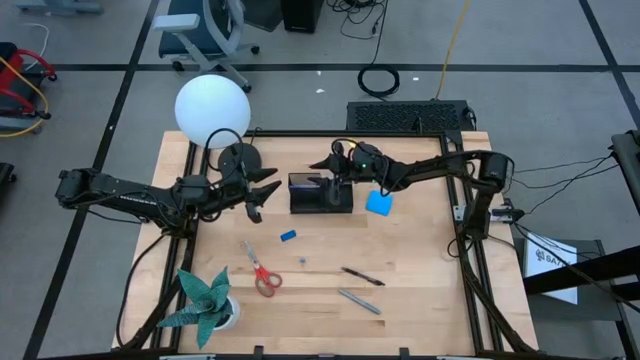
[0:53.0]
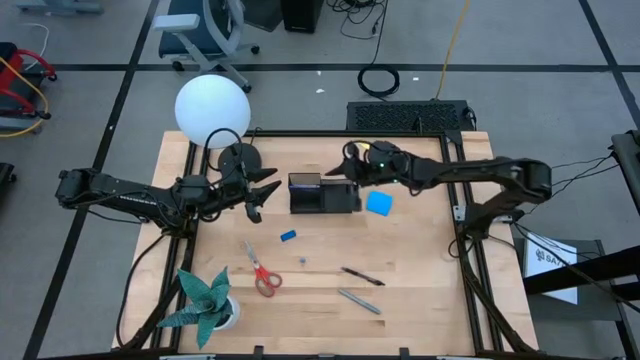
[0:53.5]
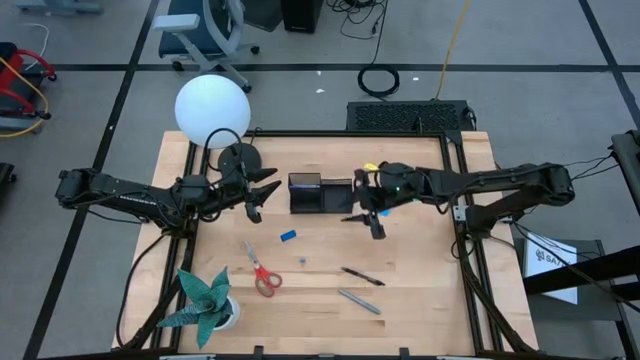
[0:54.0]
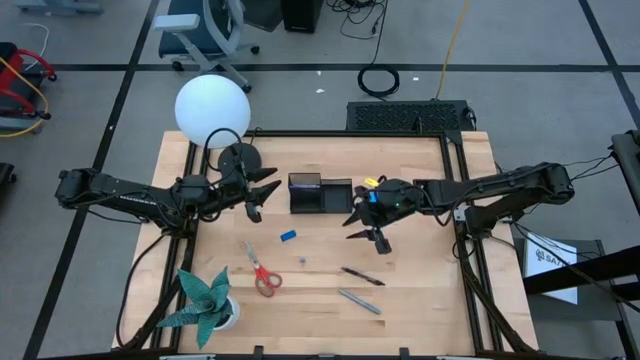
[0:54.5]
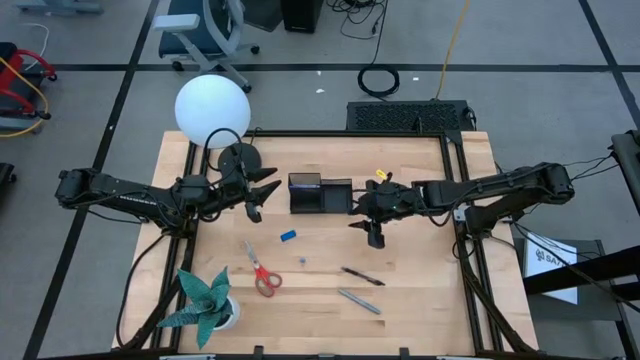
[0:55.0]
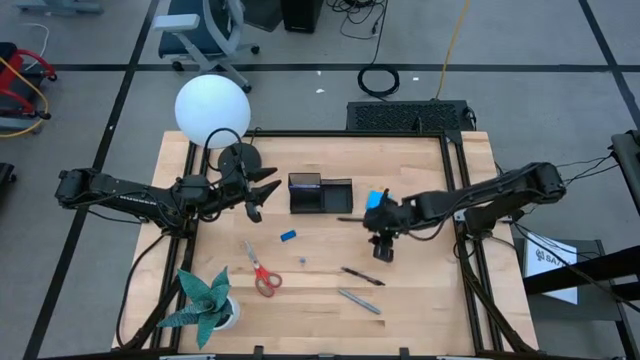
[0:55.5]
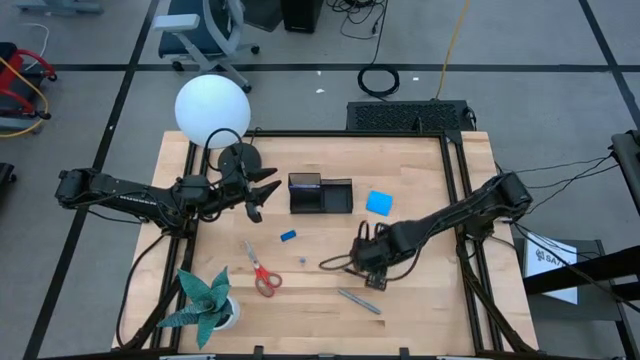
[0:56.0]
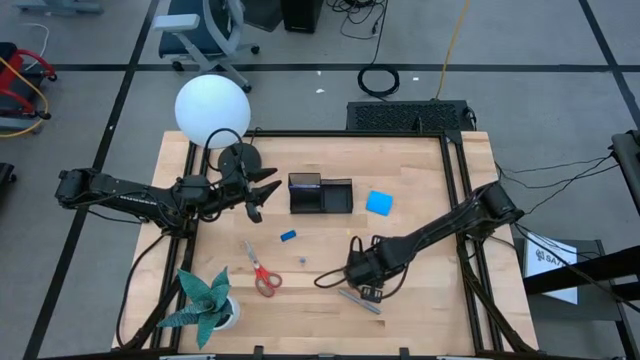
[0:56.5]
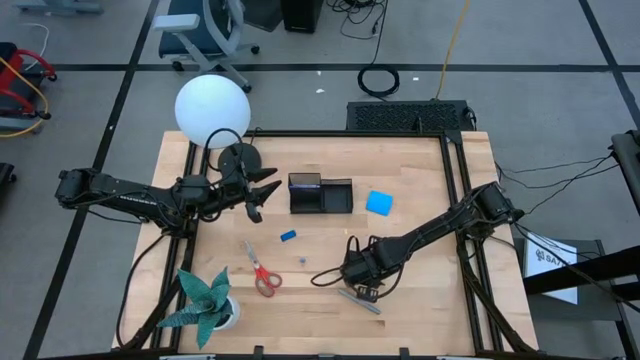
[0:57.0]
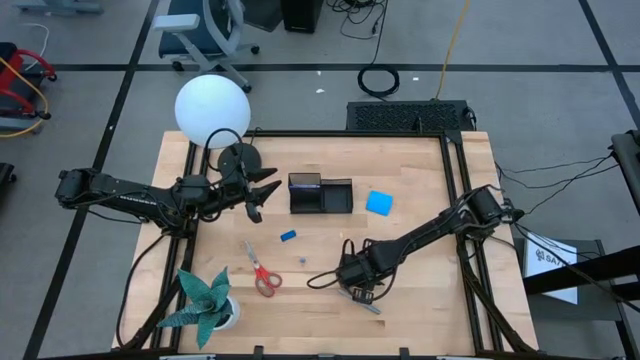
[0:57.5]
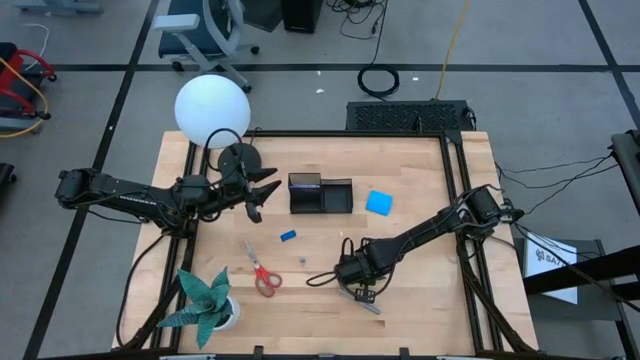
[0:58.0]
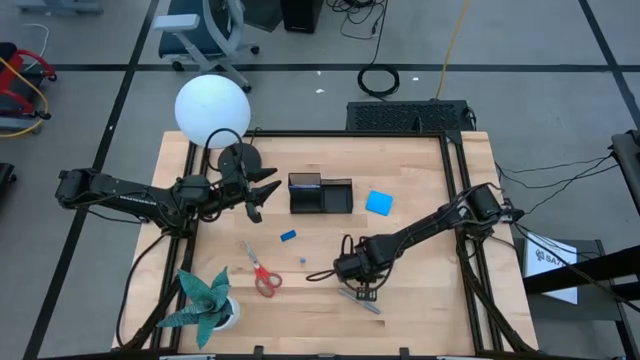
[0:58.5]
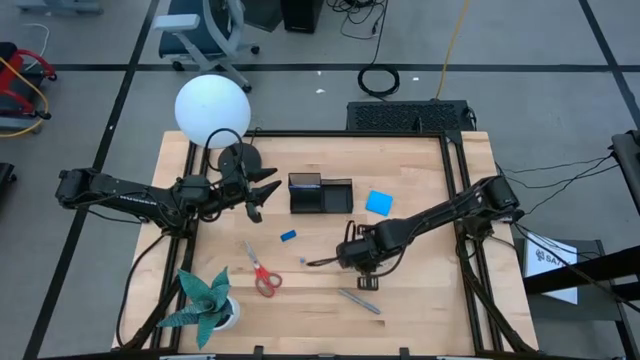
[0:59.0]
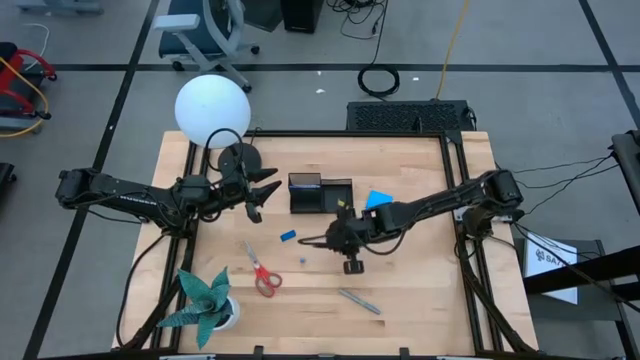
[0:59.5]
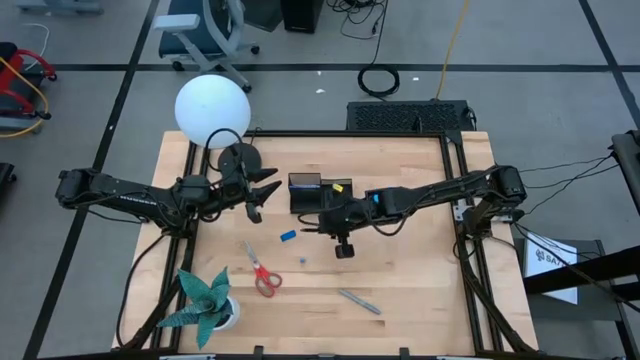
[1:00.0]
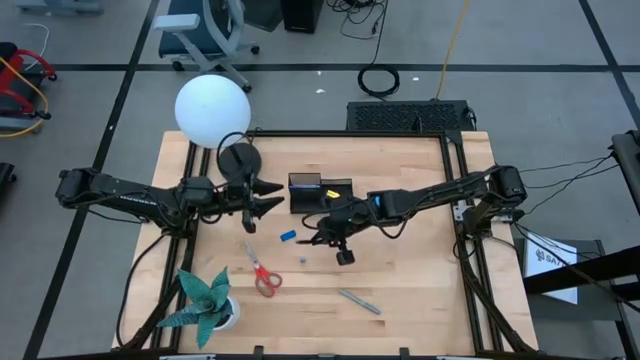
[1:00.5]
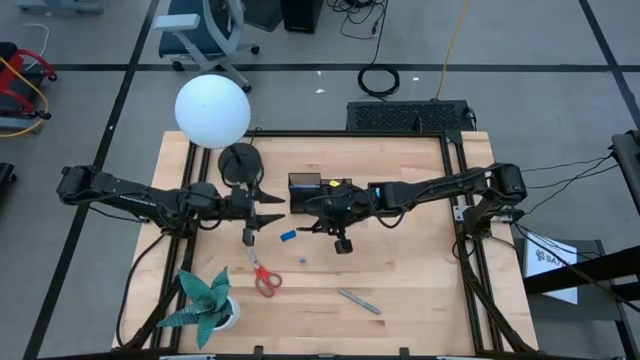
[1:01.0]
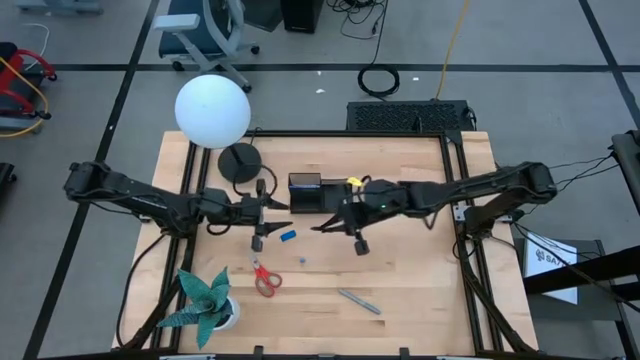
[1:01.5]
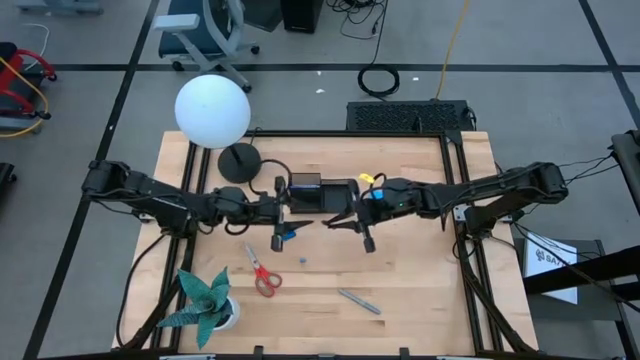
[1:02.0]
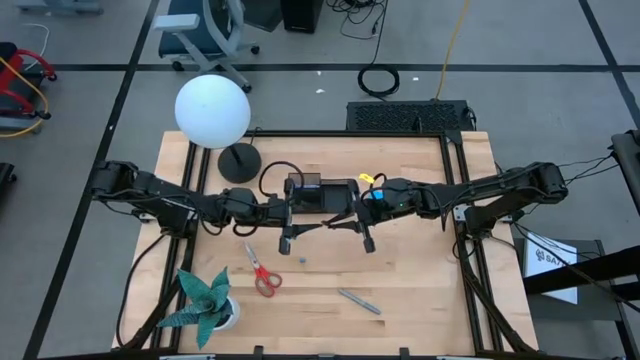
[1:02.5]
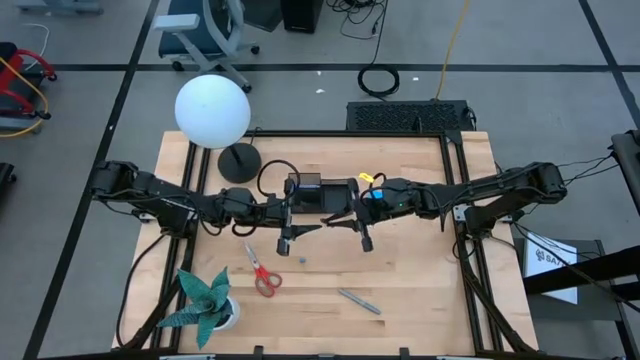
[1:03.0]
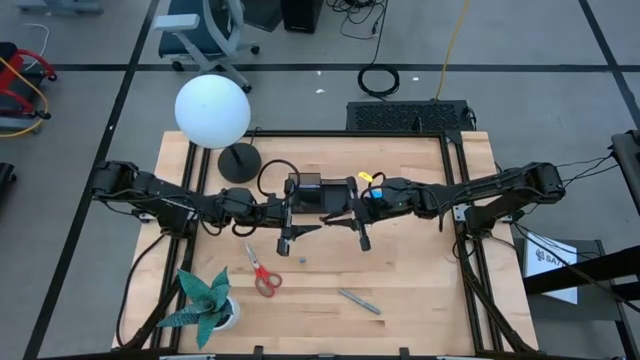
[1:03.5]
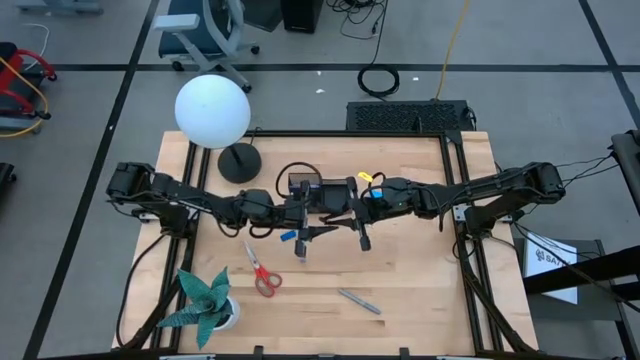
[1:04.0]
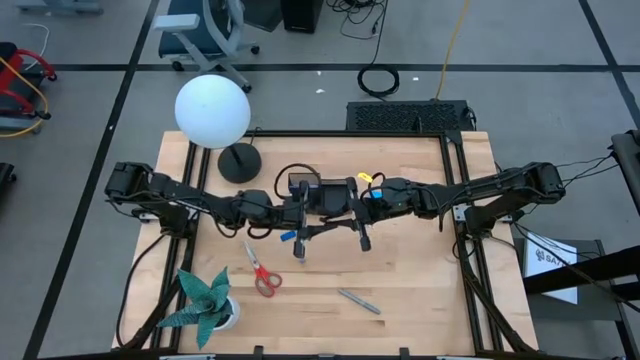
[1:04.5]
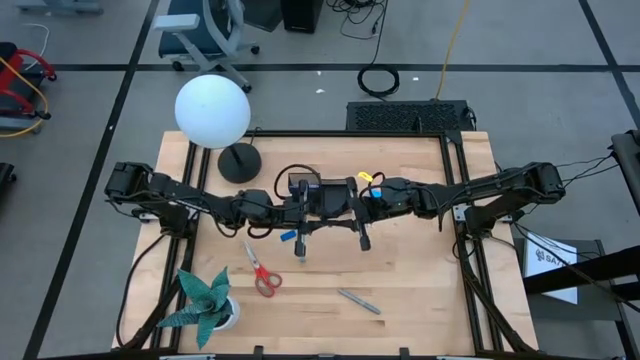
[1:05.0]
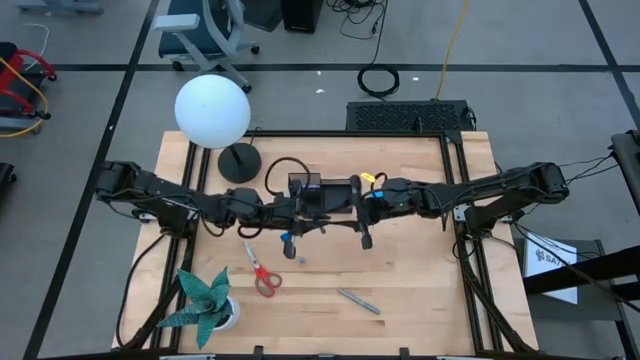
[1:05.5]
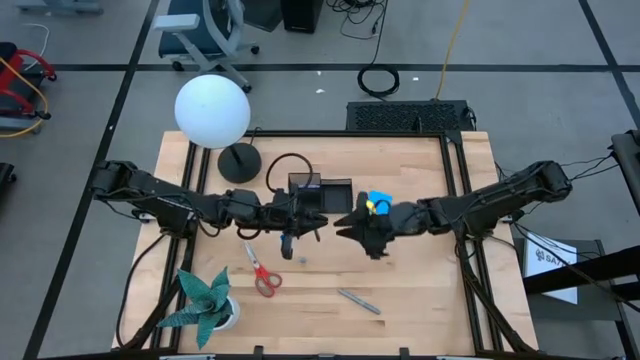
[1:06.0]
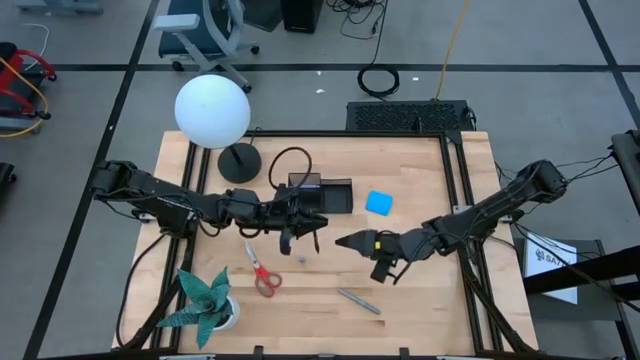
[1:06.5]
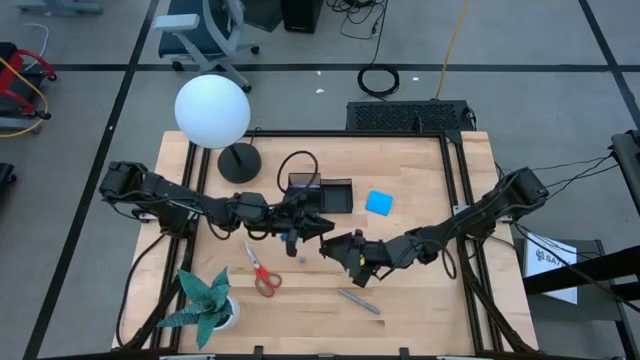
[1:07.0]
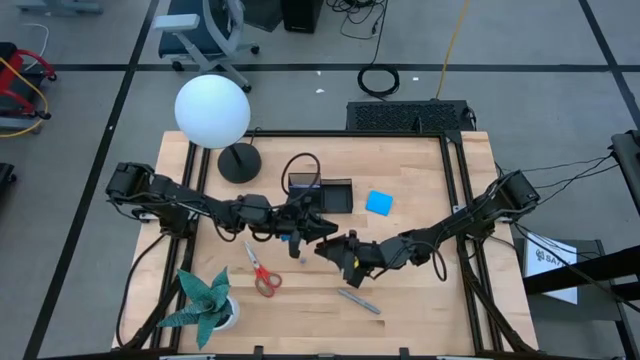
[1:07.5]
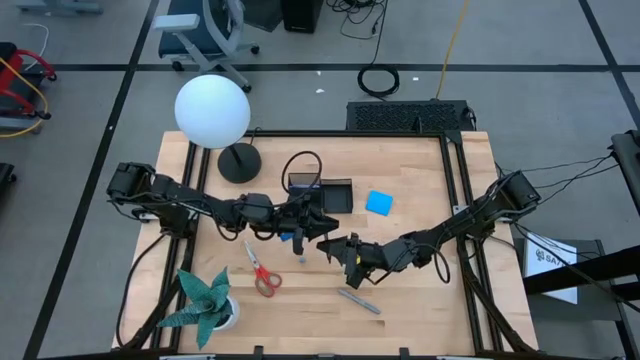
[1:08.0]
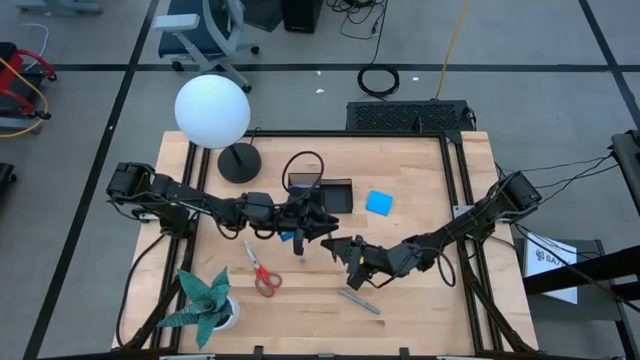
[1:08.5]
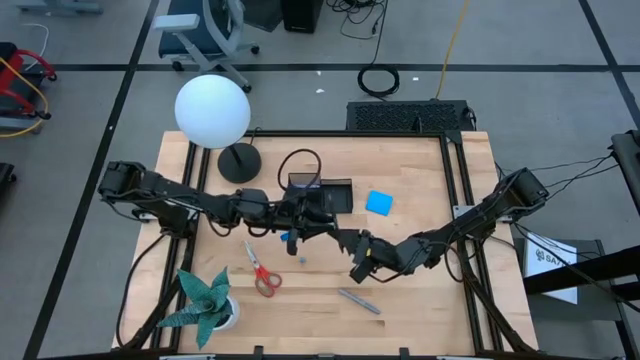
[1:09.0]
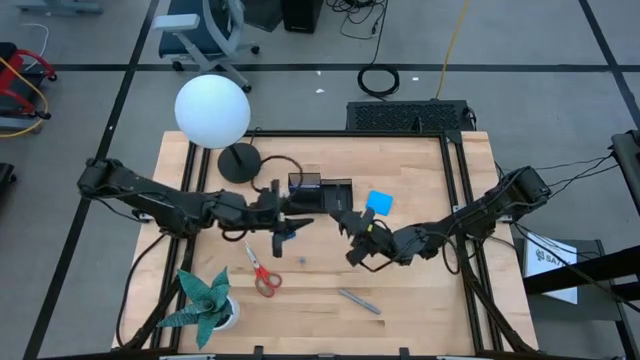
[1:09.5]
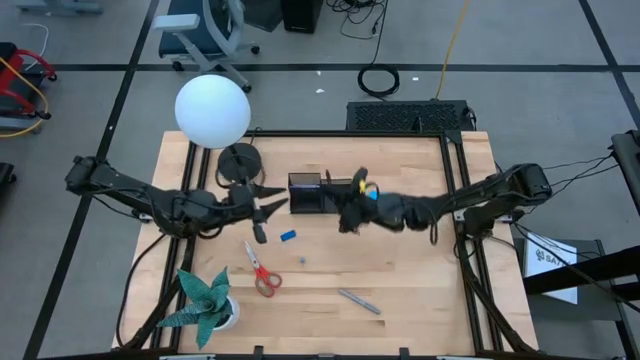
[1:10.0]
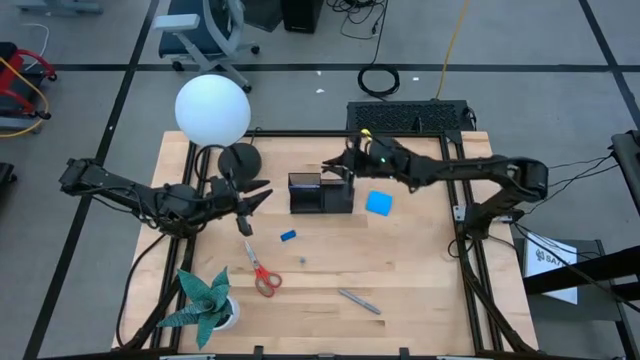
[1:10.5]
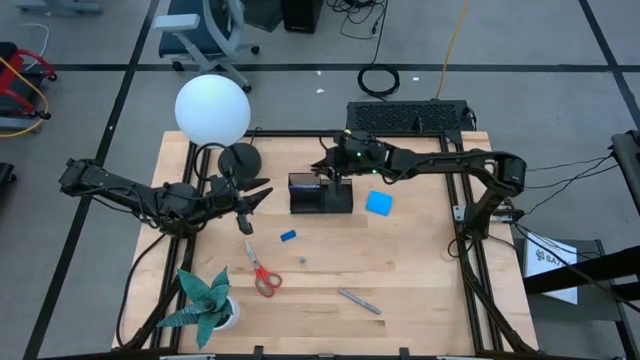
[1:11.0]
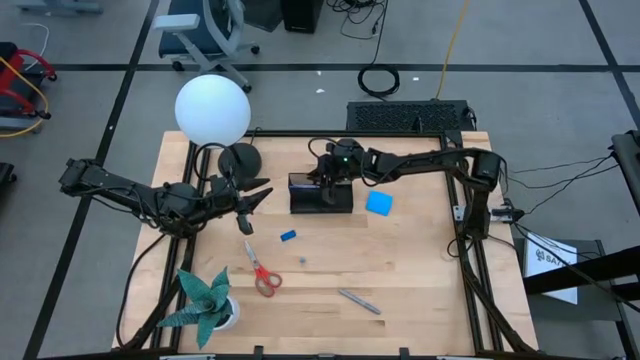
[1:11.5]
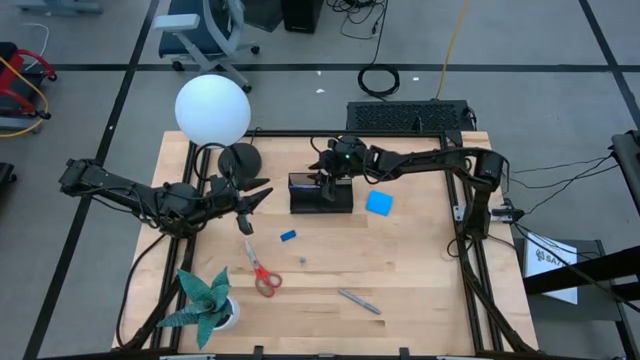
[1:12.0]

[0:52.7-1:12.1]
Task: Pick and place office supplies into organizer
Put the black pen into the black desk organizer

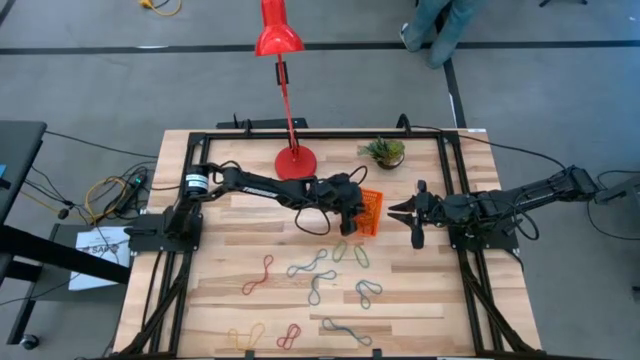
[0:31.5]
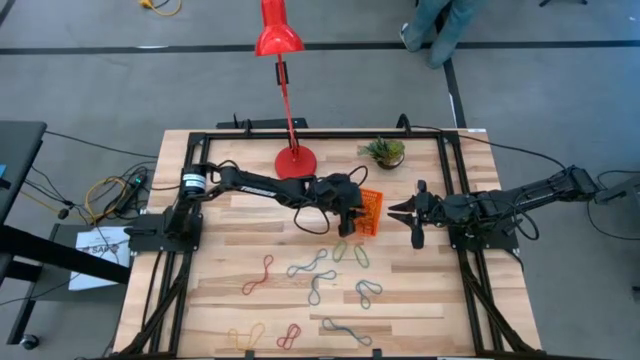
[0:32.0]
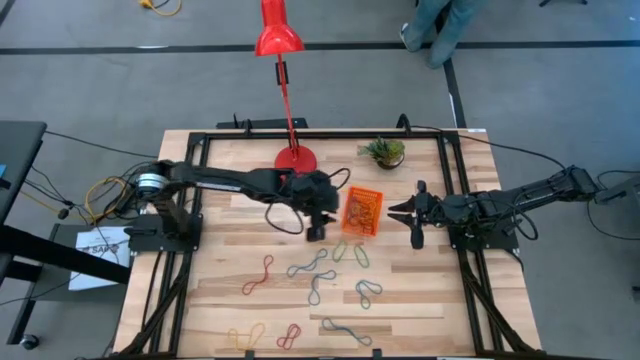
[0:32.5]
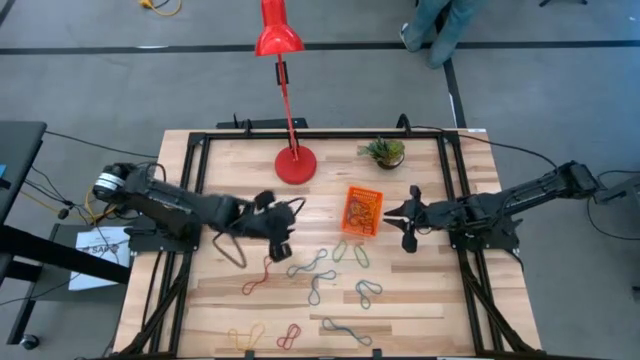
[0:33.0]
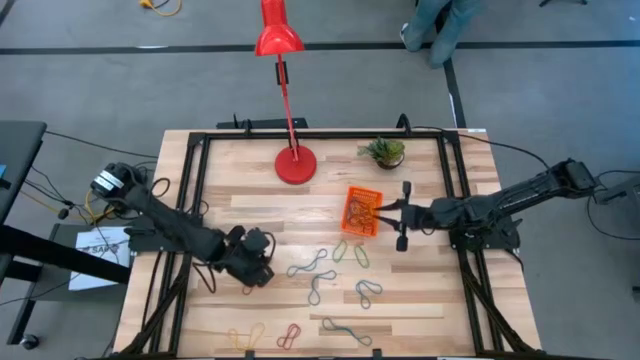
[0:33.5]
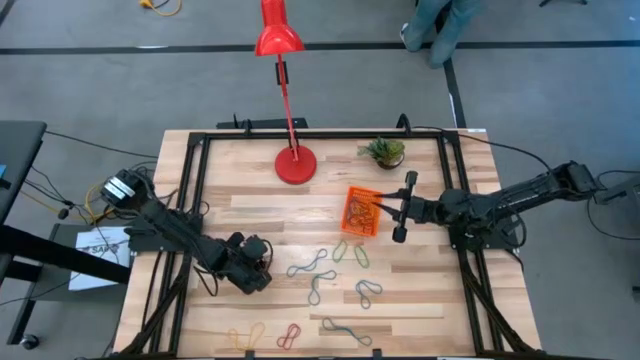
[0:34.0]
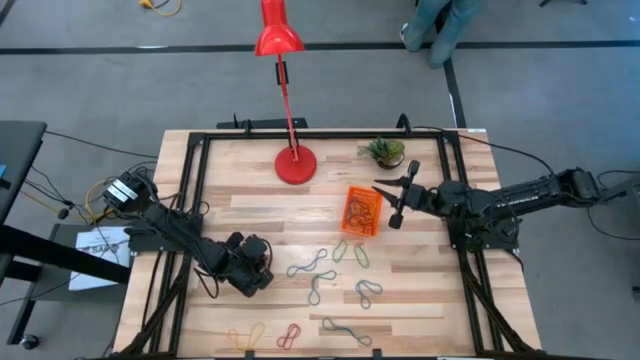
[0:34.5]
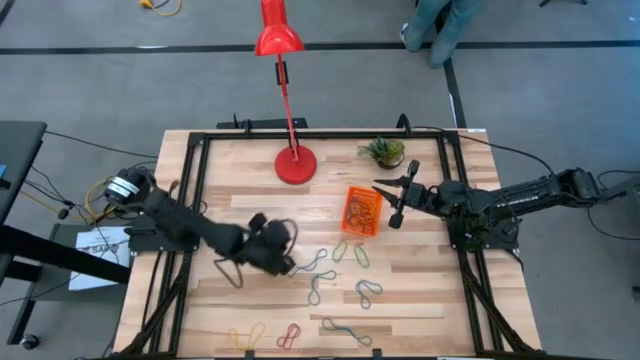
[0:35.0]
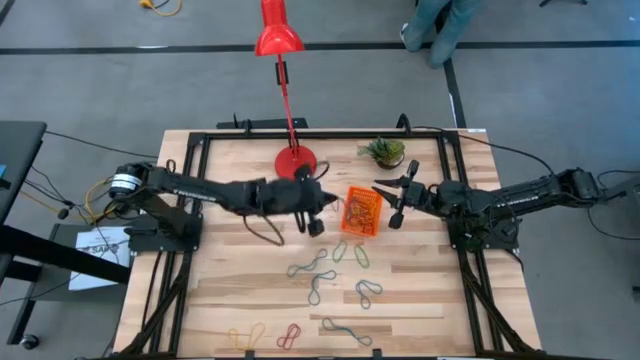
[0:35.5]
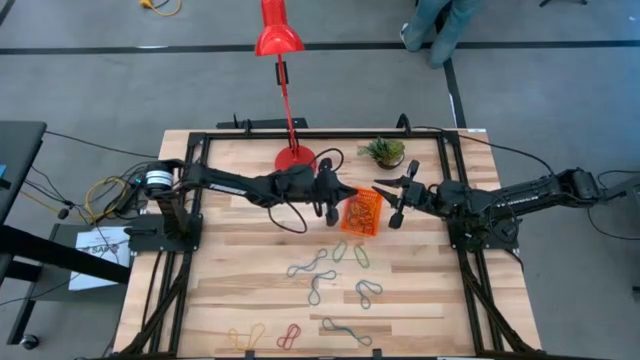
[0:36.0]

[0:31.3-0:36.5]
Task: Pick and place items into bin
Put the top red rubberband into the orange basket
